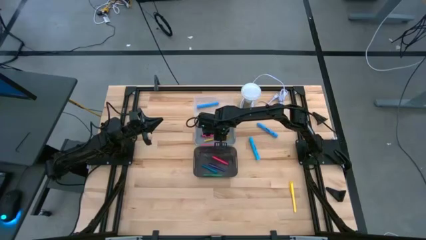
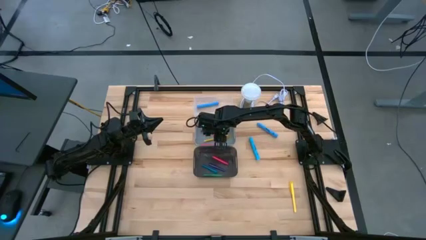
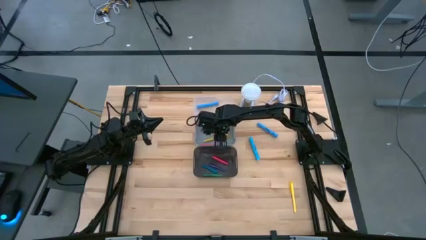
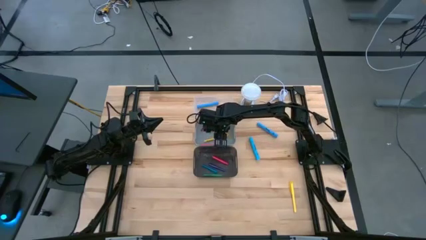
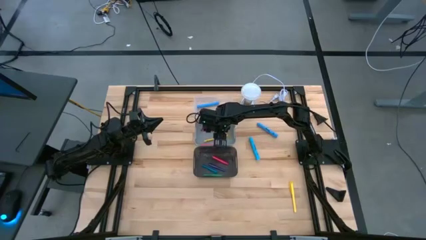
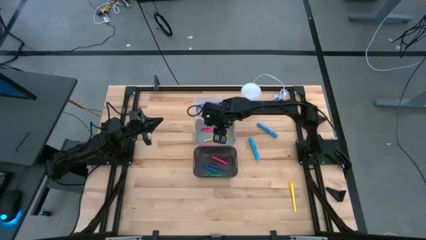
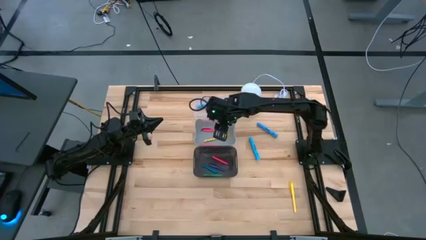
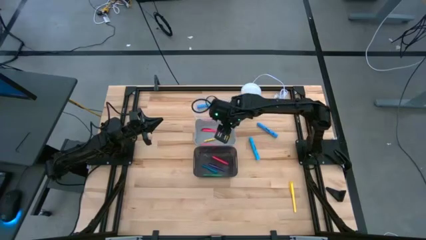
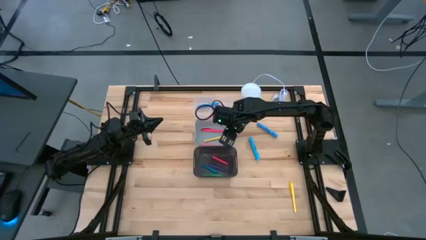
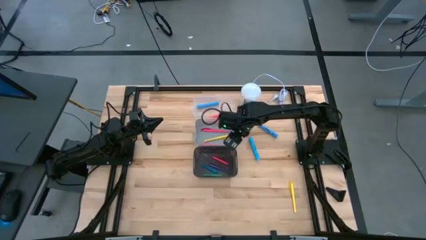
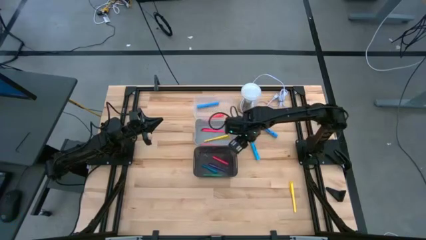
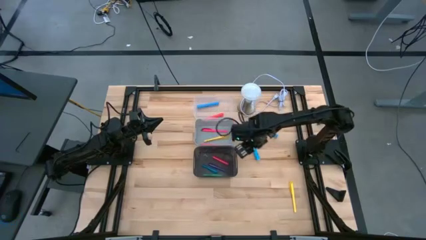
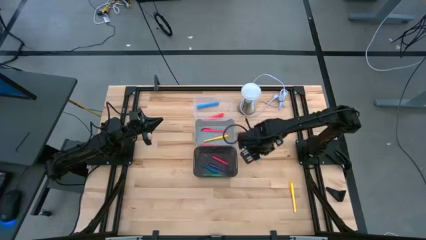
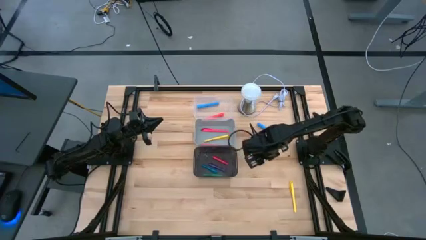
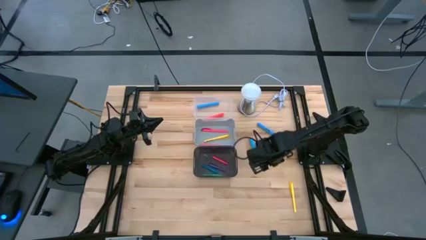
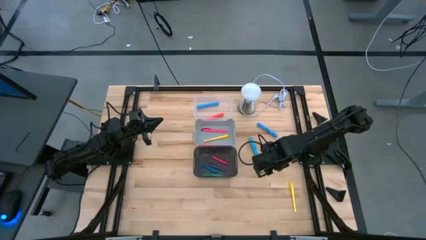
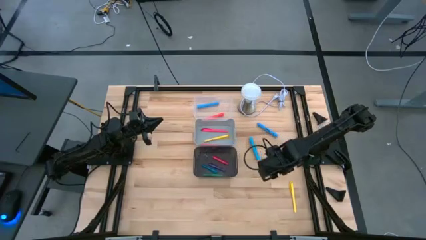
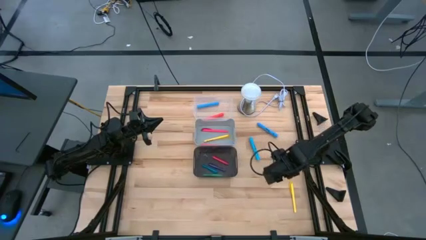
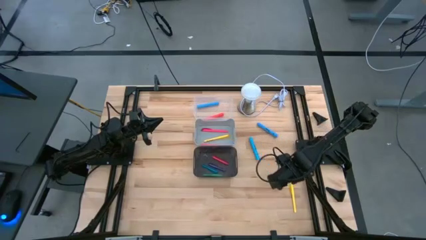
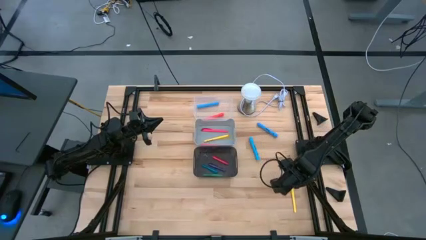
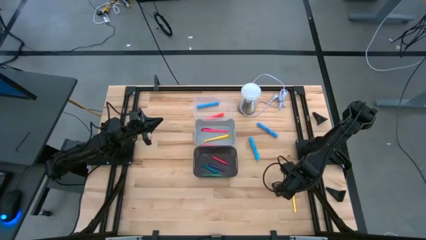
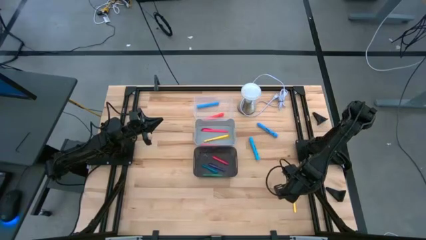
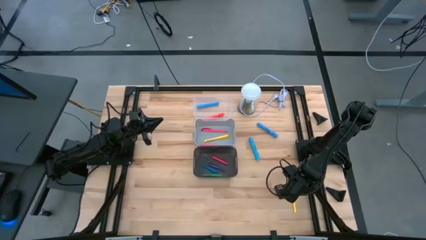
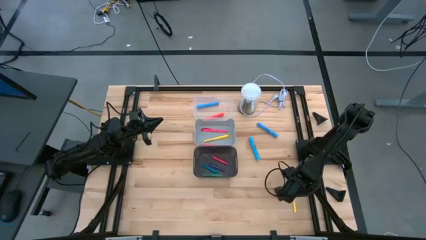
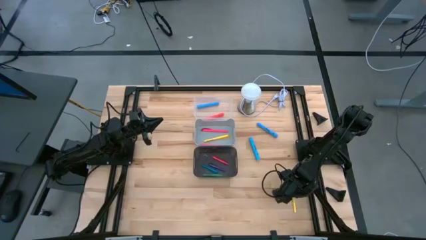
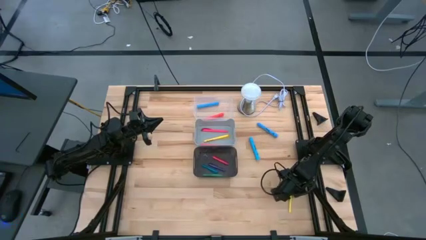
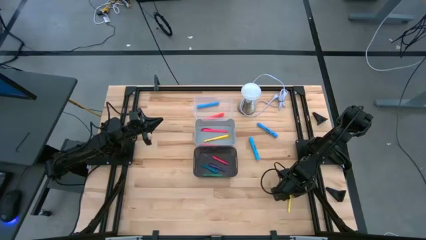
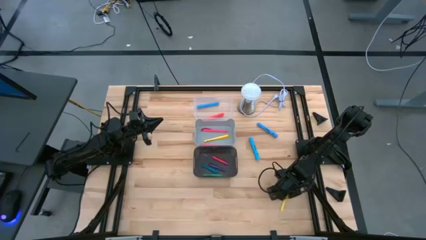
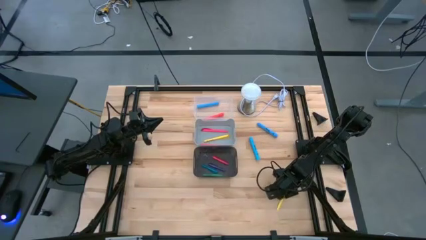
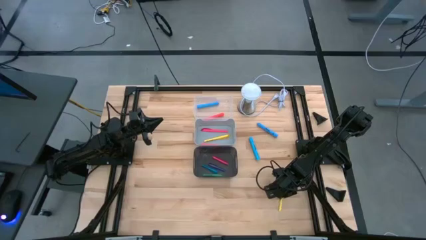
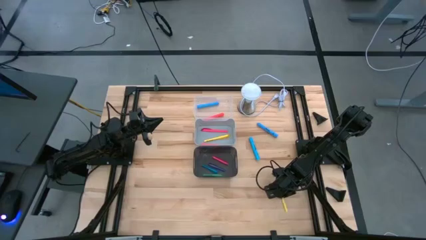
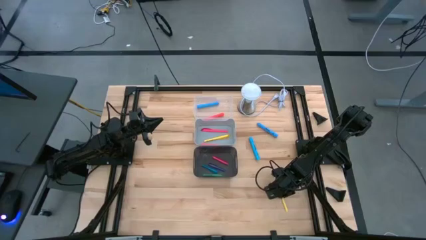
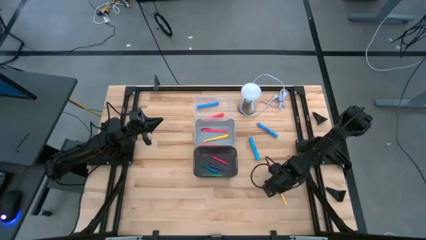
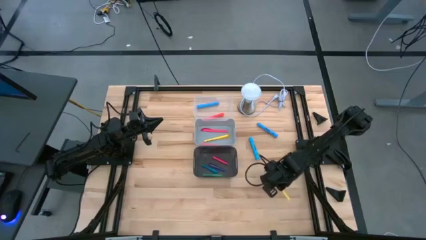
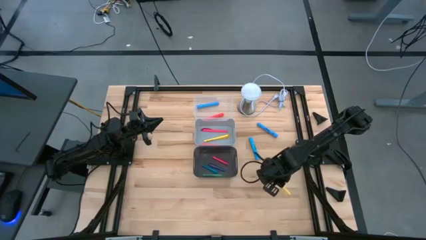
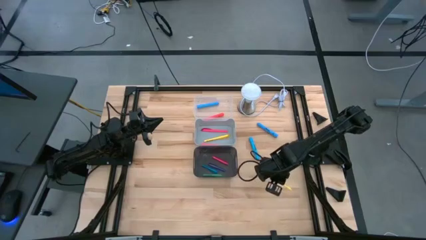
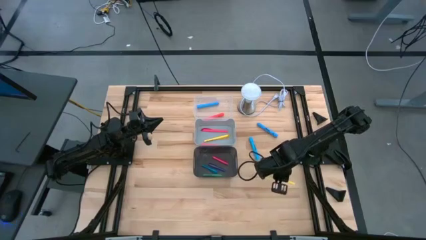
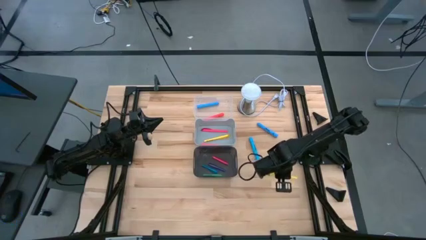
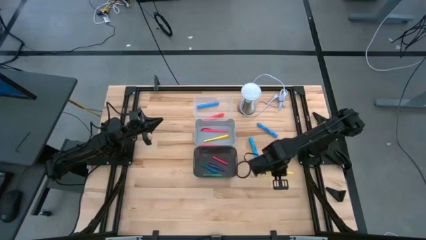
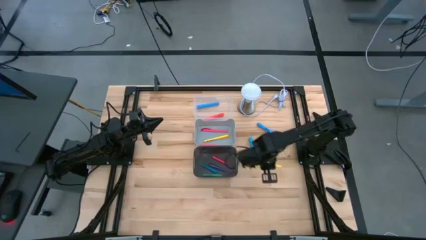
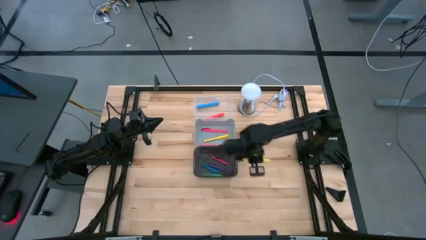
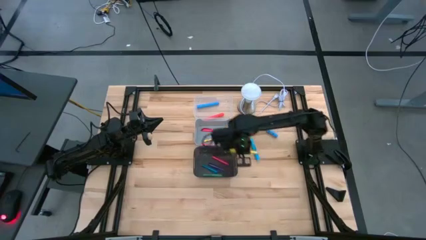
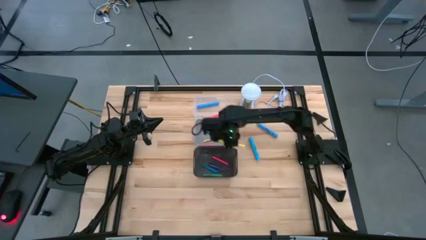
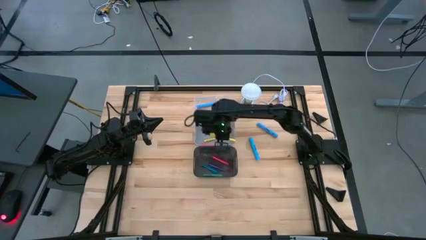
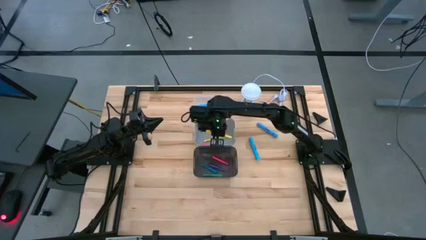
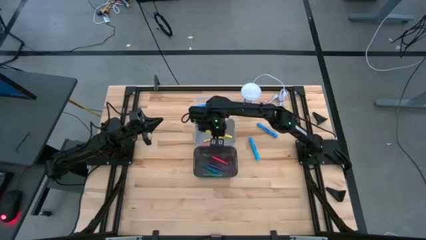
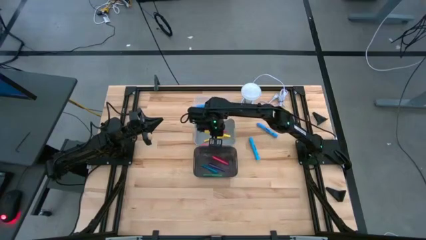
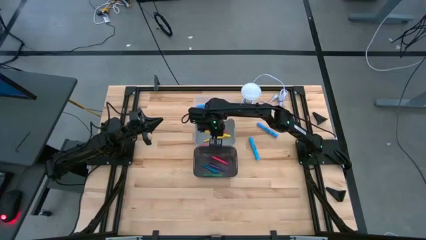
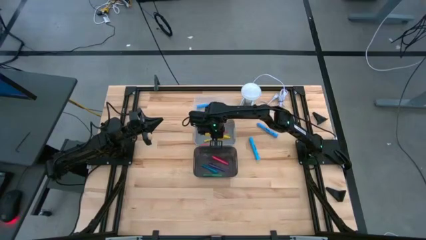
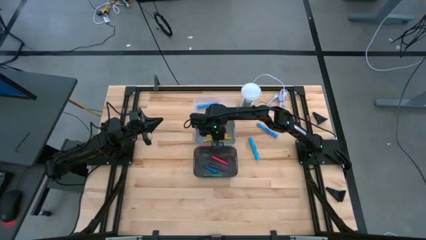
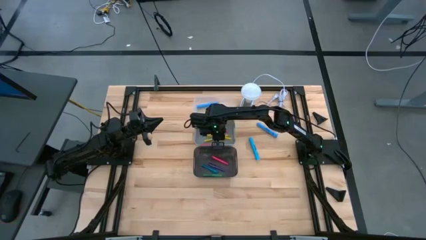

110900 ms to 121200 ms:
Task: Pick & Place Markers
Put the yellow marker into the transparent bin

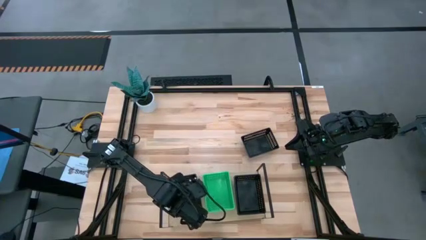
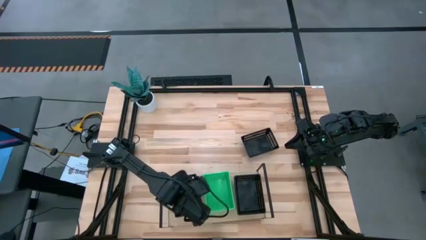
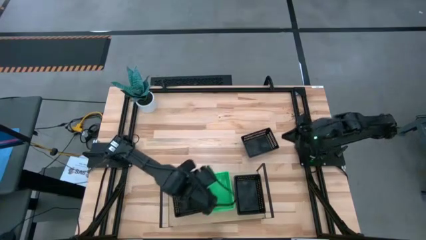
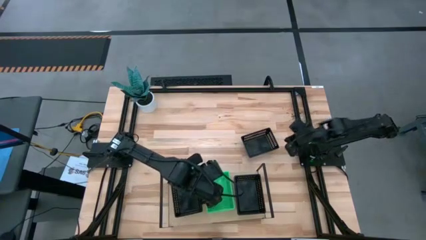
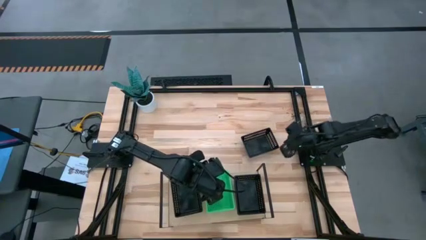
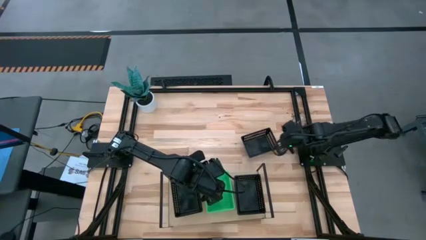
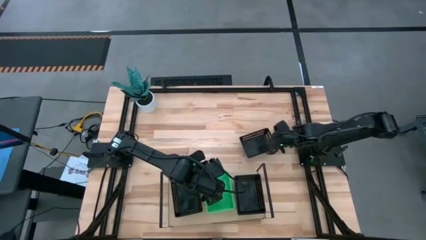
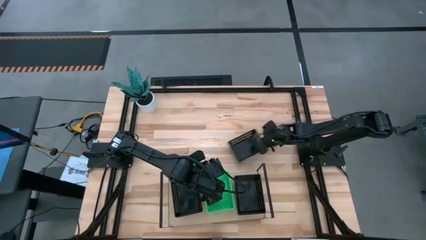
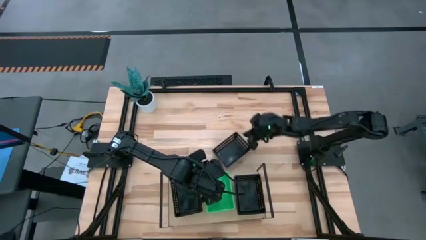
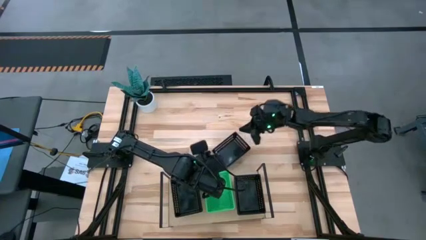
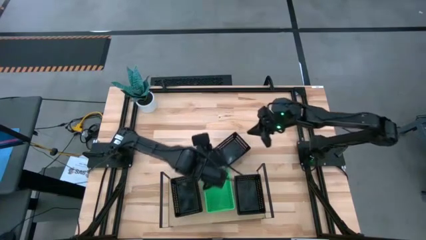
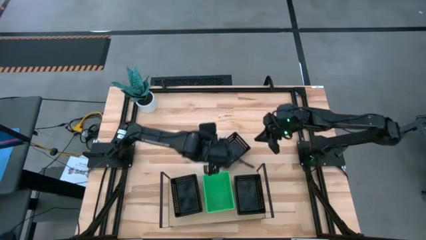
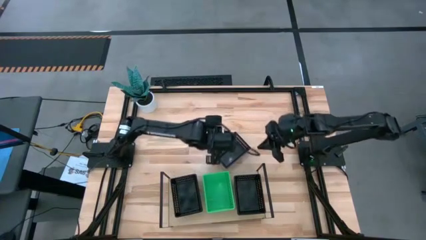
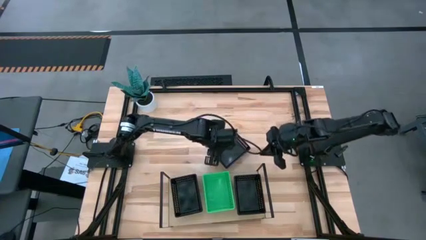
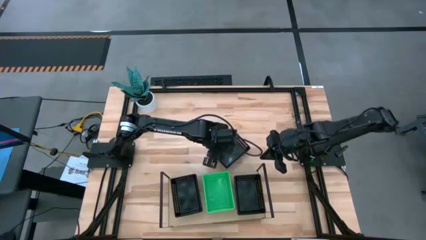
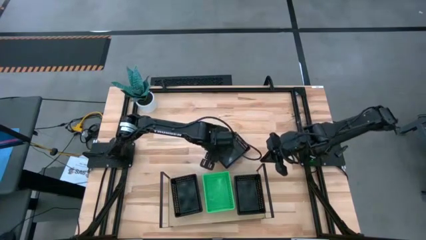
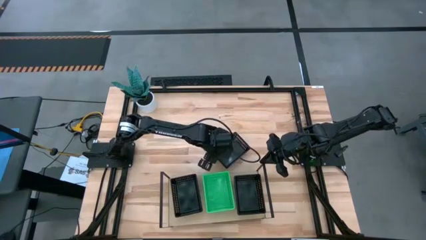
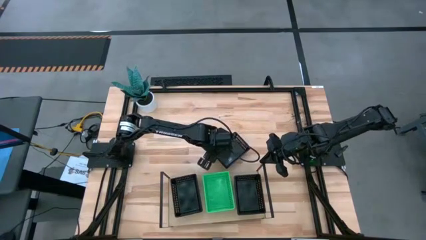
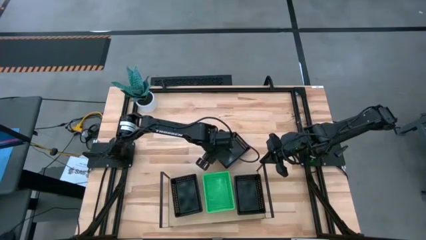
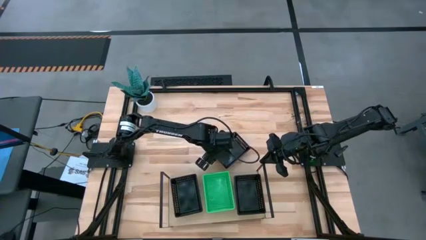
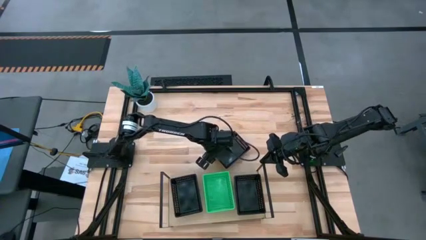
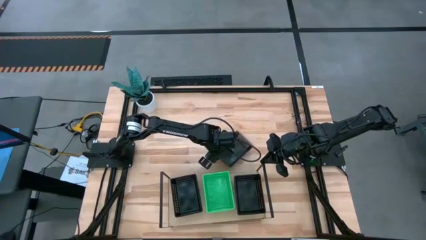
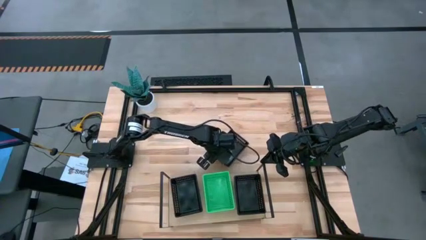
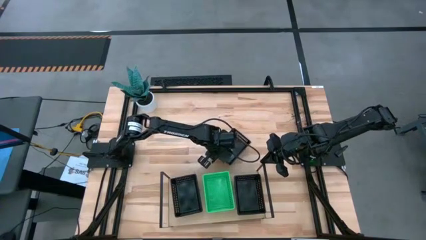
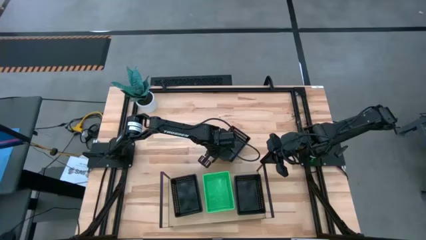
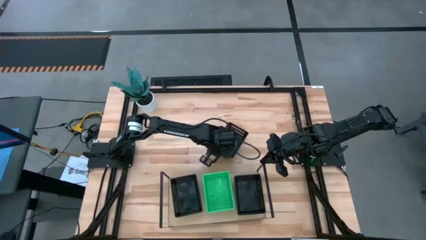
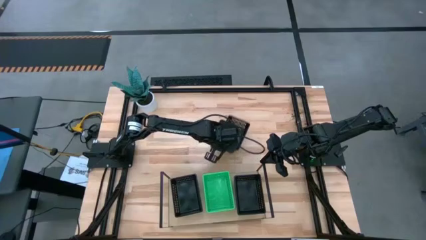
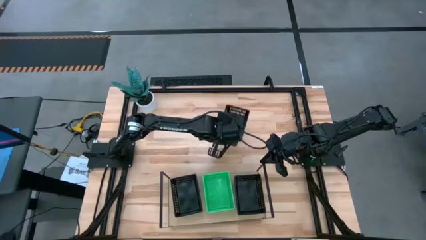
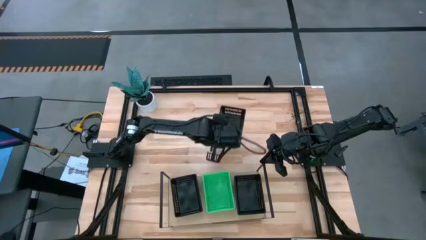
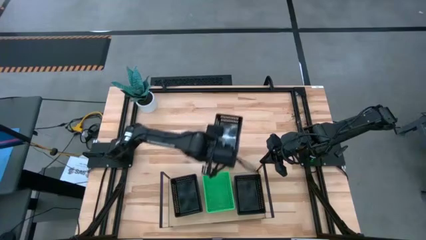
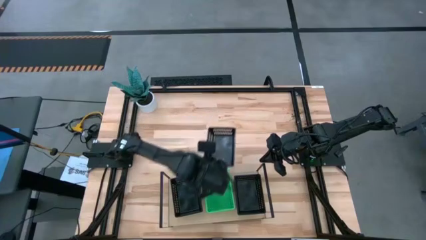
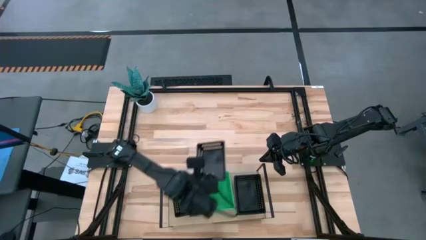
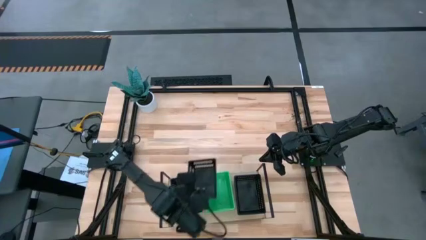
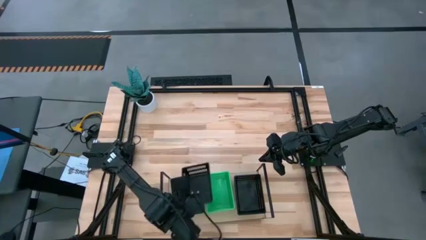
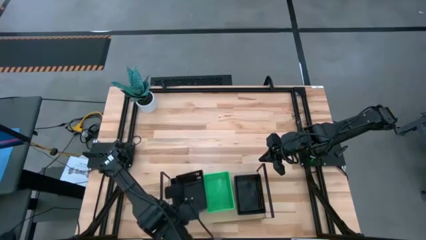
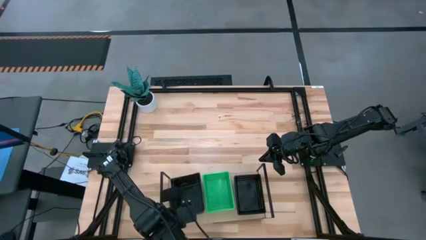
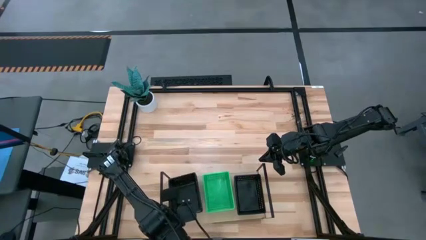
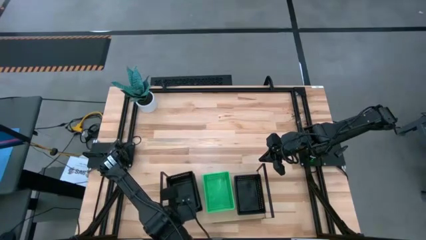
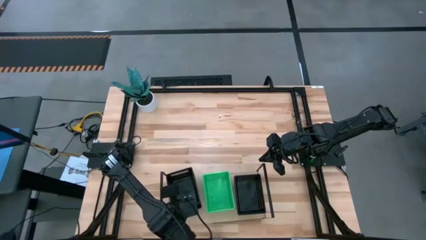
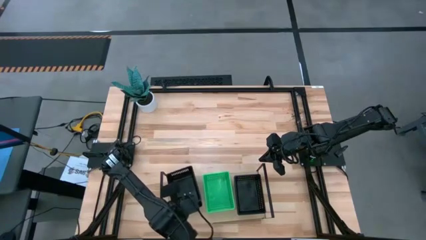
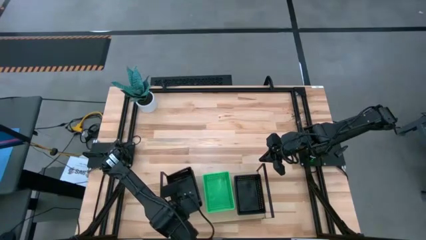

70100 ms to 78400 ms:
Task: Stack baskets on shelf by color
Stack the black bin on the black bin on the shelf
